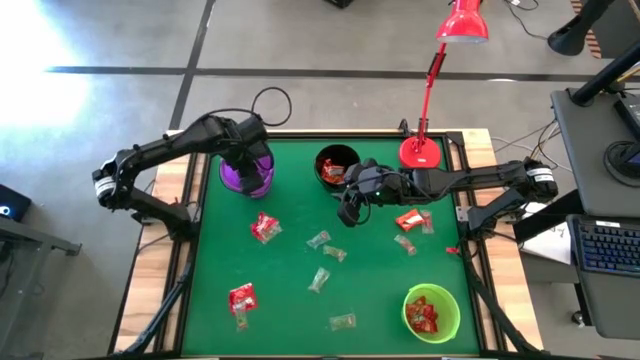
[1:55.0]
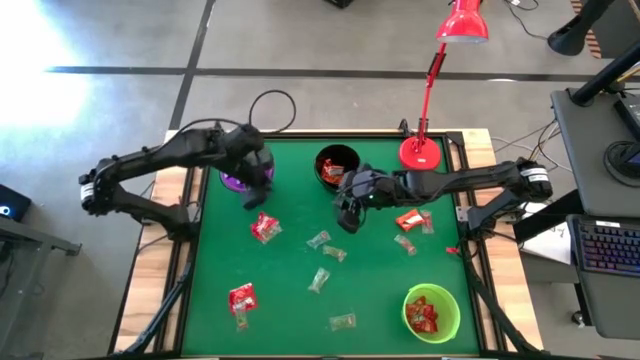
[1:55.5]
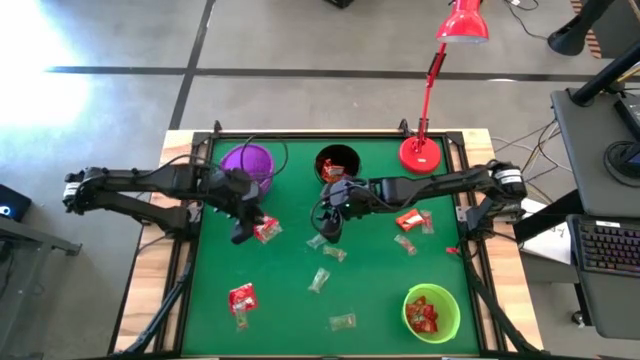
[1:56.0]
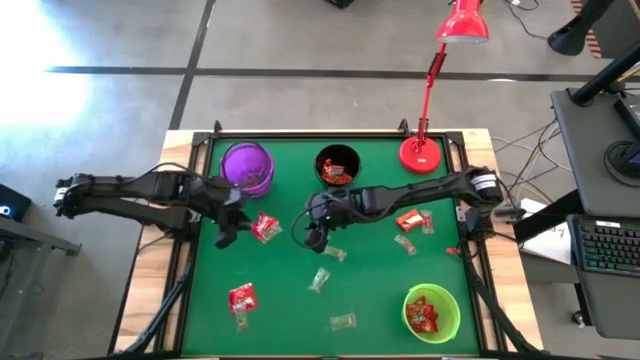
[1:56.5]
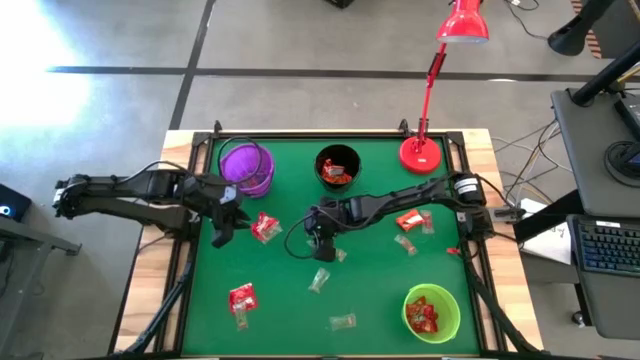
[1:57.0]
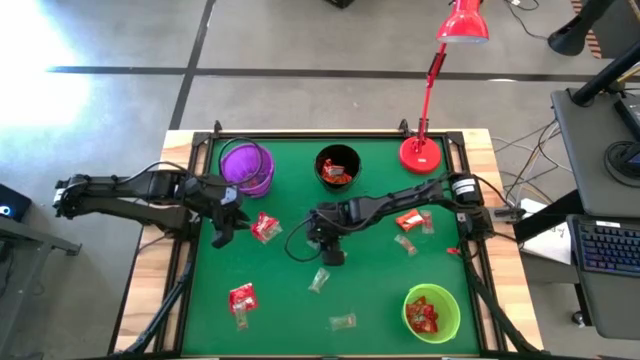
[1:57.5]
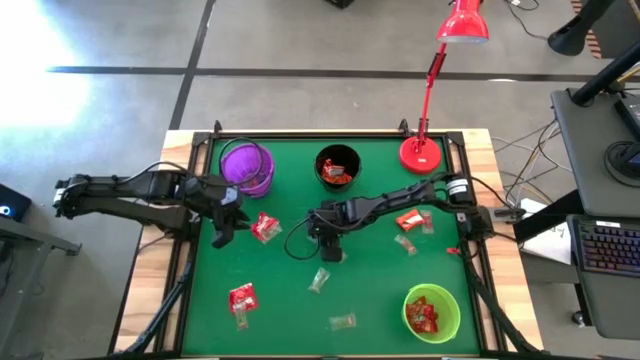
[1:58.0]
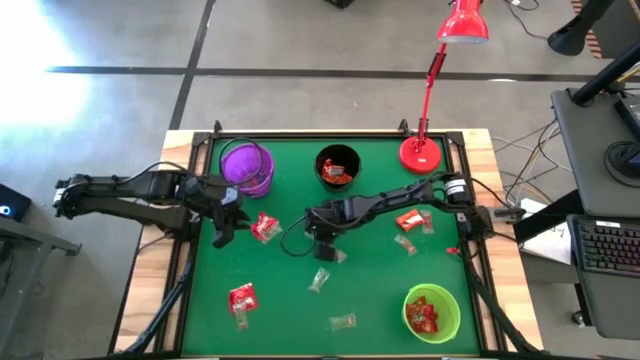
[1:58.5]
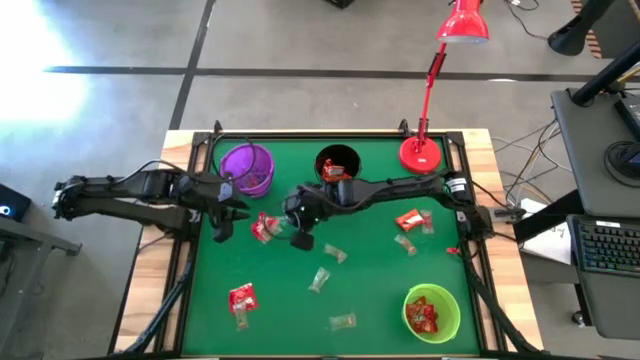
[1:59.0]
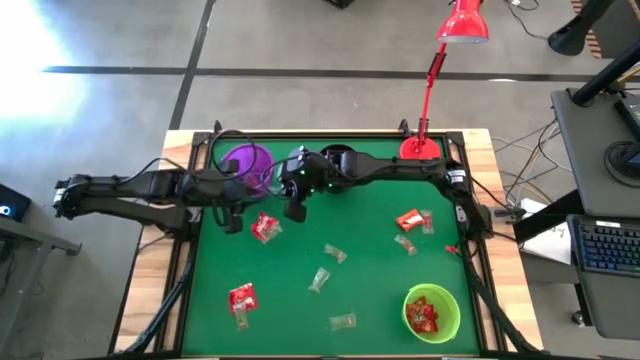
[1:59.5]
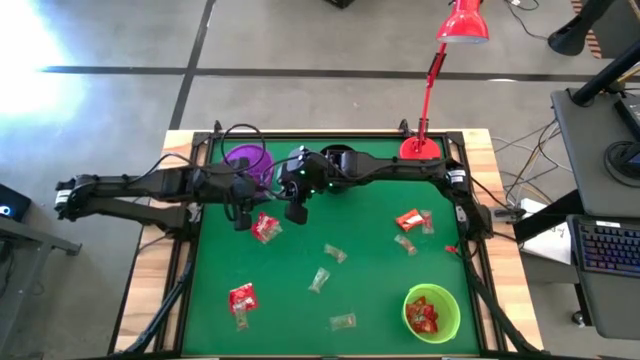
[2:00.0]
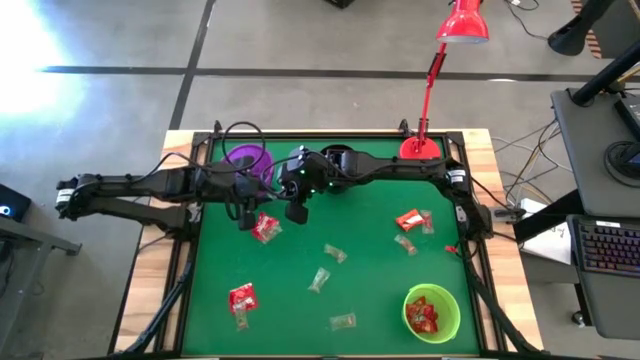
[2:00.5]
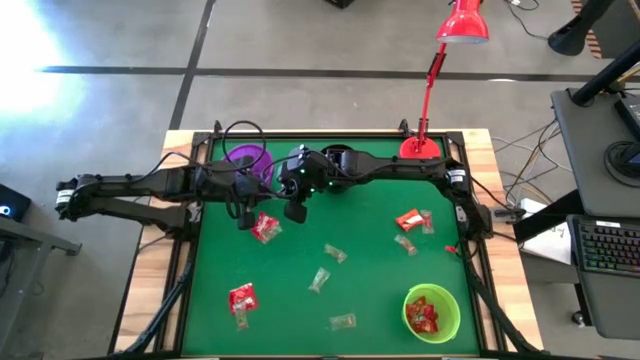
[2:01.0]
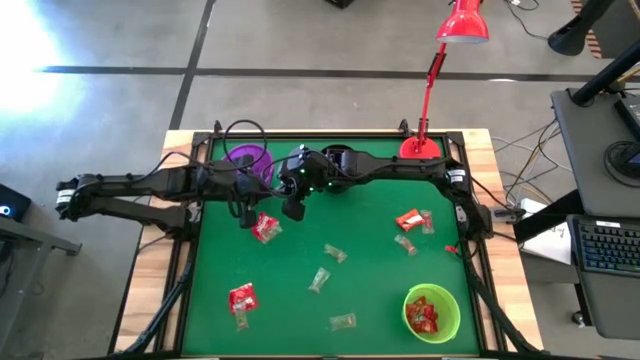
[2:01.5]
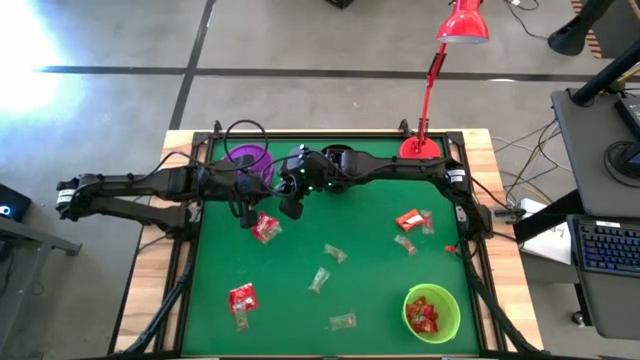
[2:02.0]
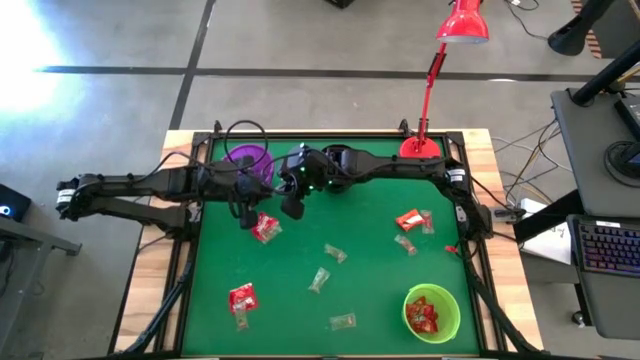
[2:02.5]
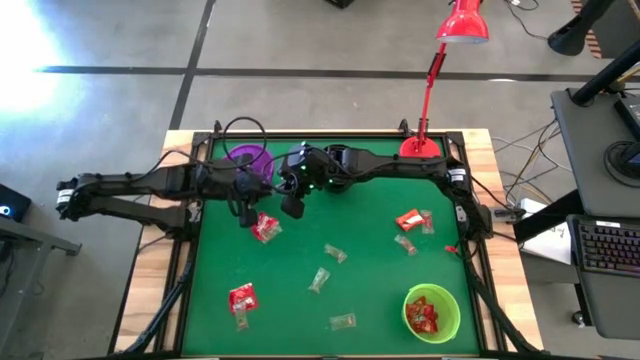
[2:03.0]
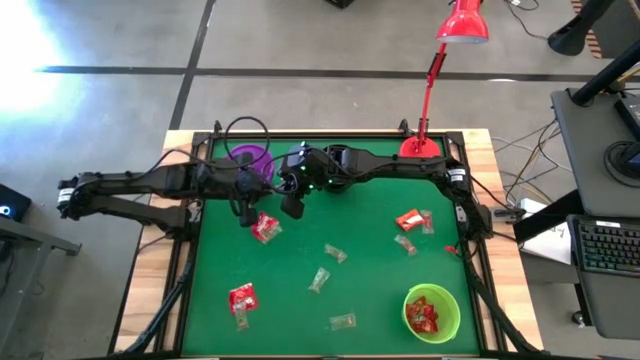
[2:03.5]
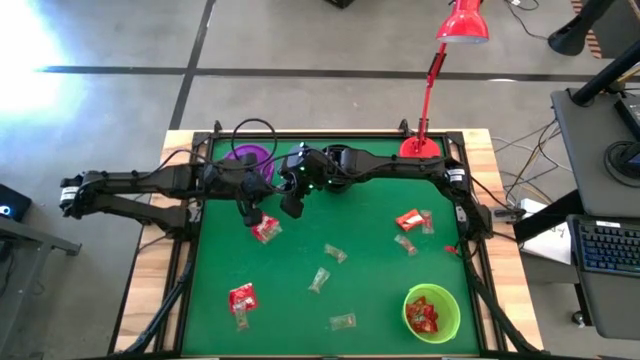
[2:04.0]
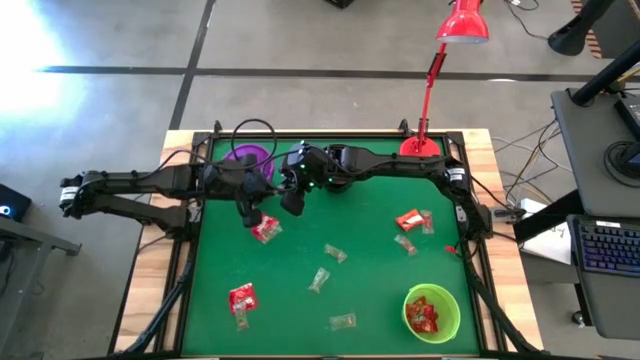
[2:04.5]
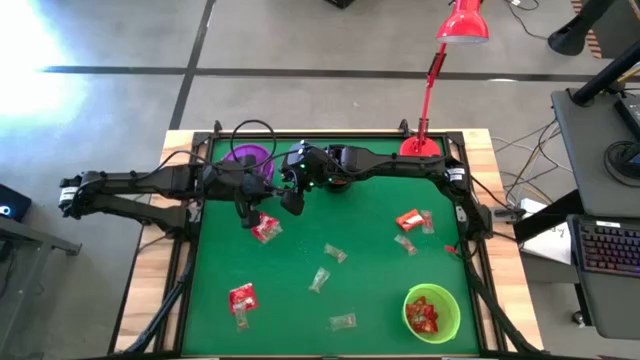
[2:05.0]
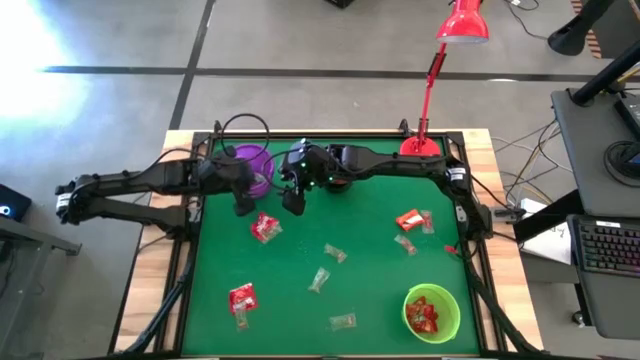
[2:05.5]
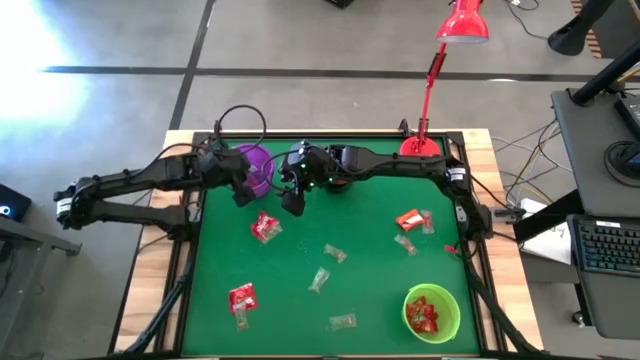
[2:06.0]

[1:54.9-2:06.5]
Task: Sort candy
Put the blue gummy into the violet bucket

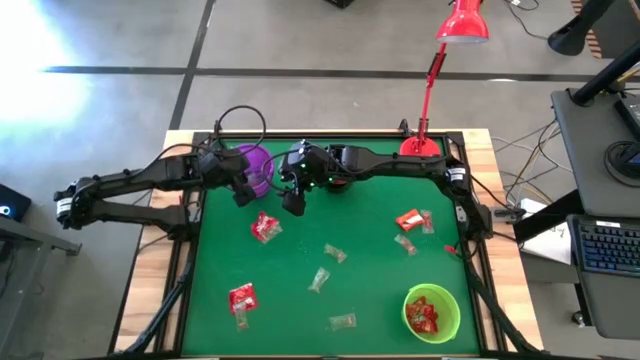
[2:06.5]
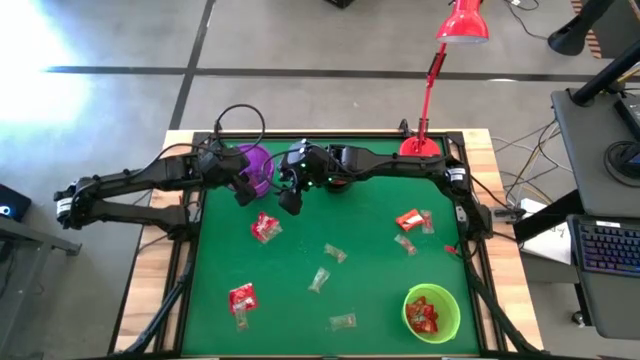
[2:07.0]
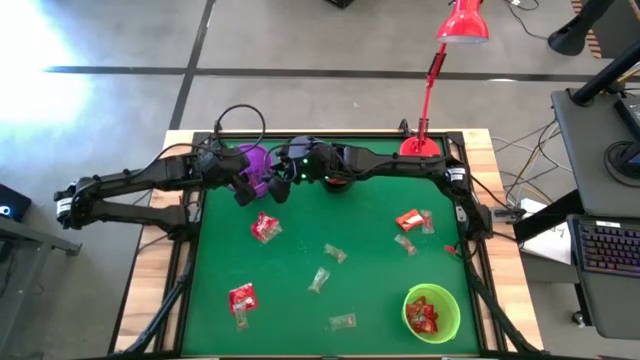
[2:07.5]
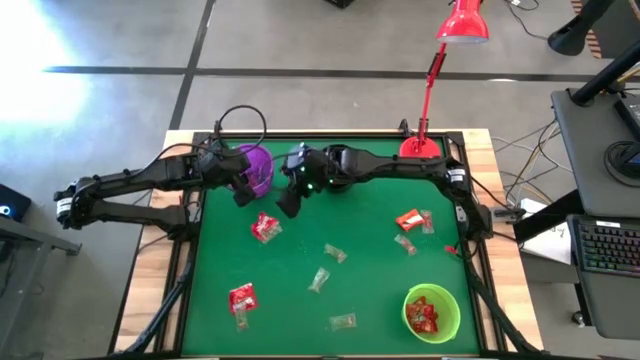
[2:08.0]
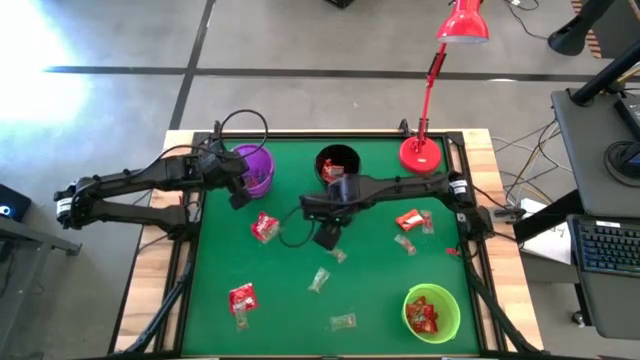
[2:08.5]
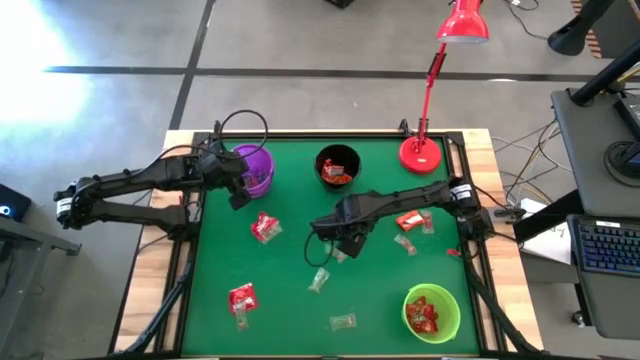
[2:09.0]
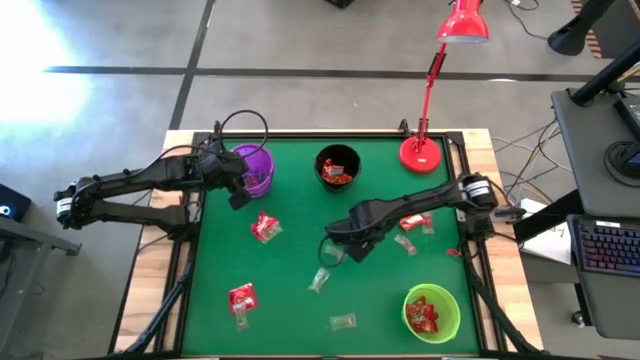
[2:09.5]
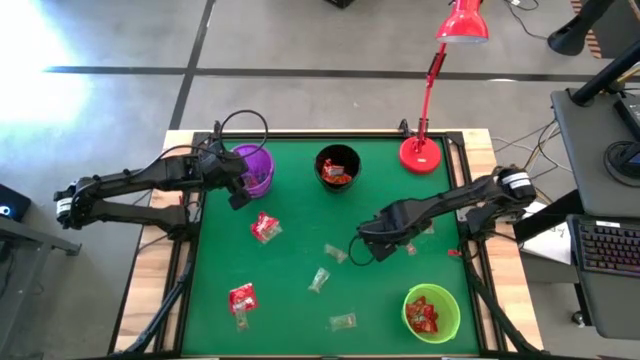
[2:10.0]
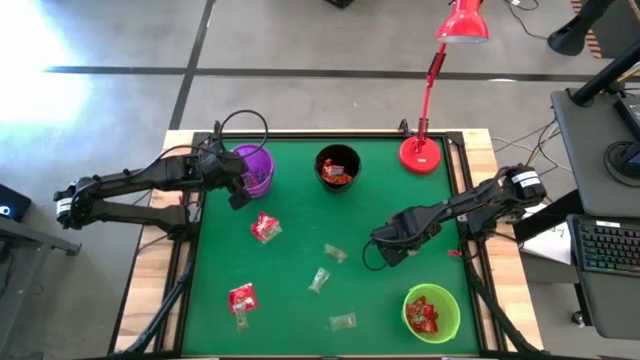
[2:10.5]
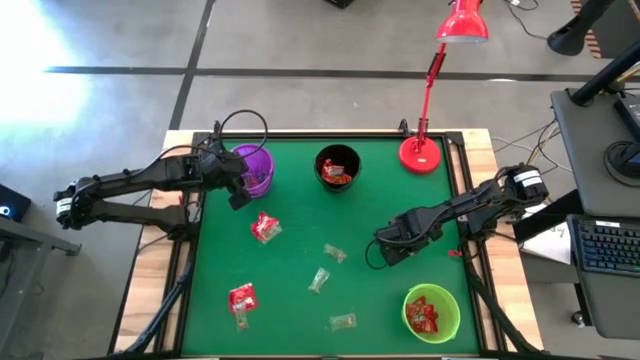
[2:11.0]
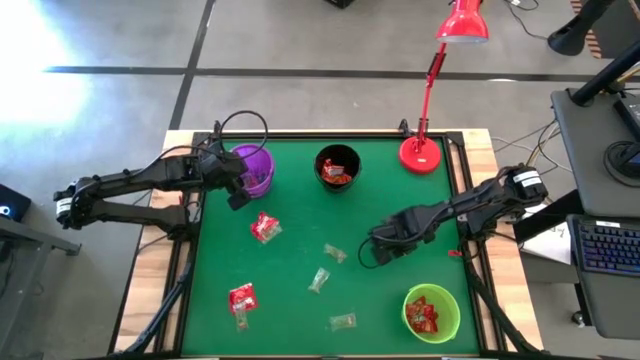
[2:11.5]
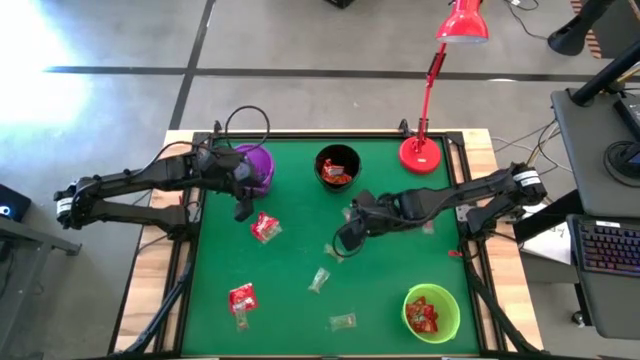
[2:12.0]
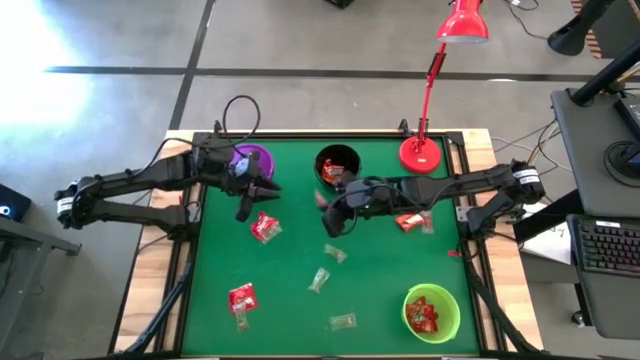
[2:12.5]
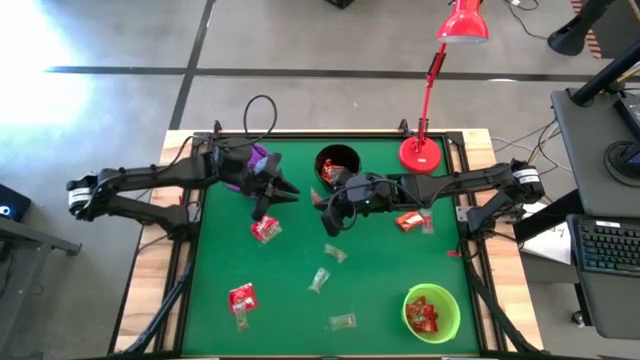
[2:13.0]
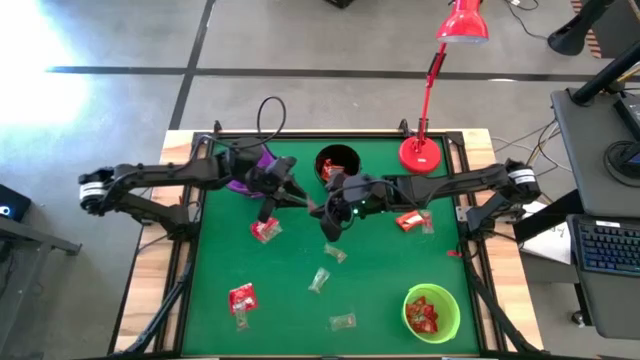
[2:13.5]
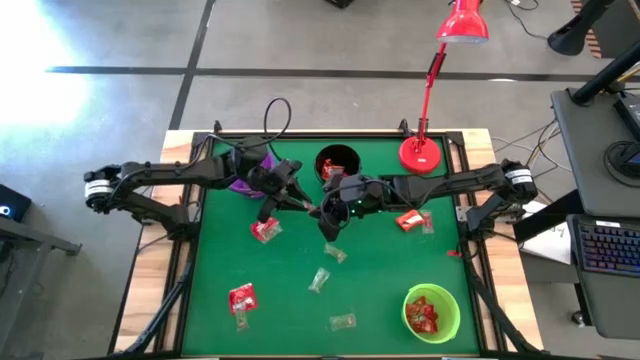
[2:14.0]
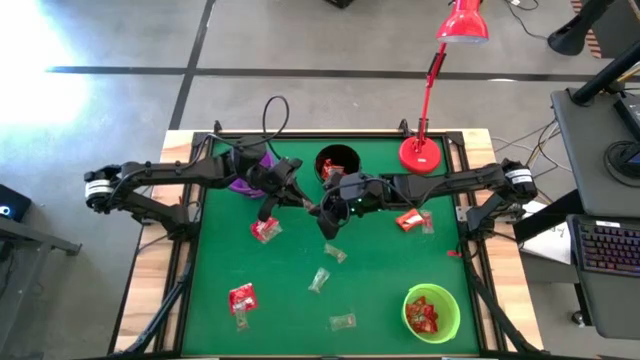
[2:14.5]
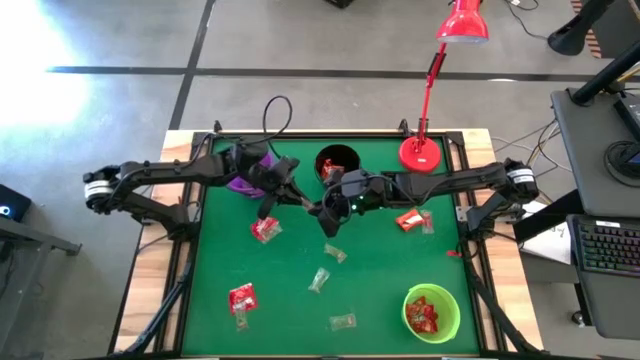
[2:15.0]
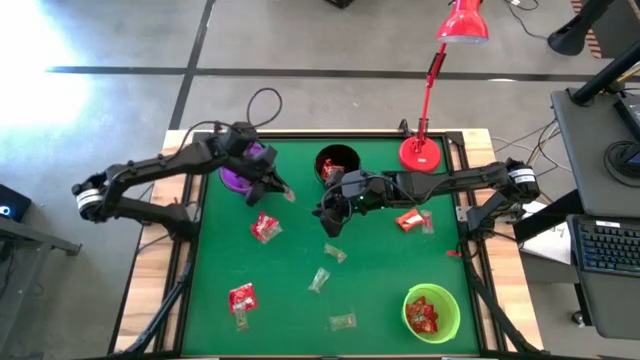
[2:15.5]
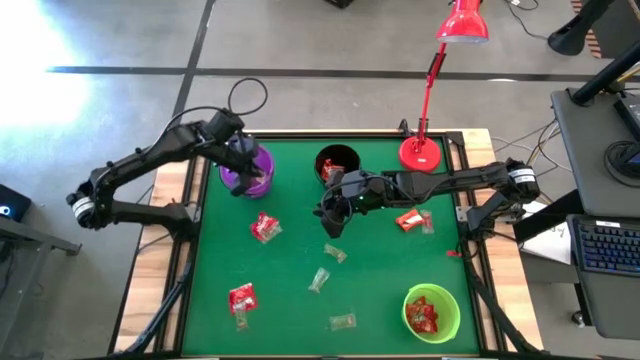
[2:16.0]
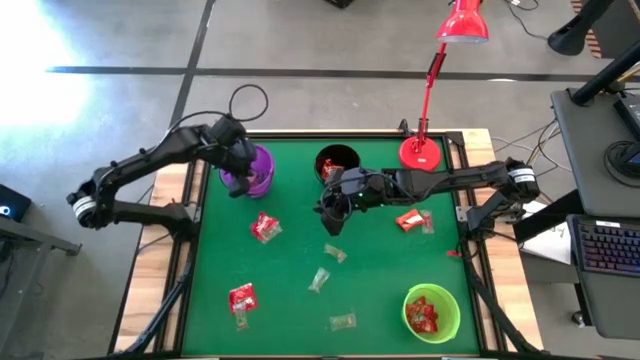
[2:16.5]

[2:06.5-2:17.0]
Put the orange gummy into the violet bucket
